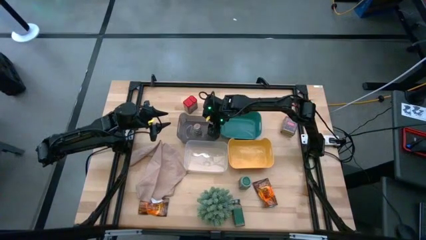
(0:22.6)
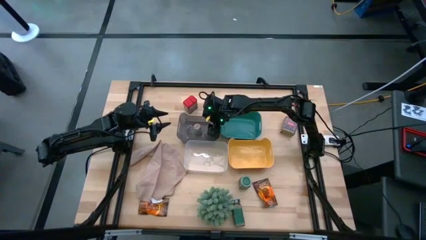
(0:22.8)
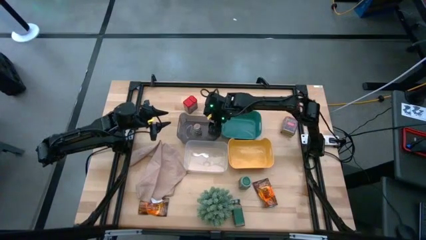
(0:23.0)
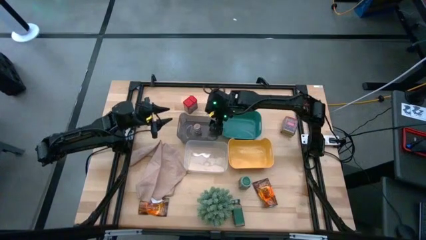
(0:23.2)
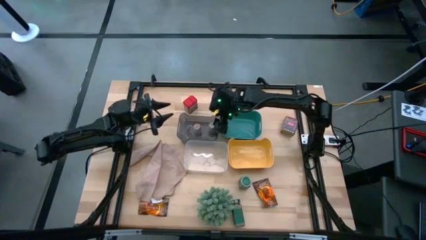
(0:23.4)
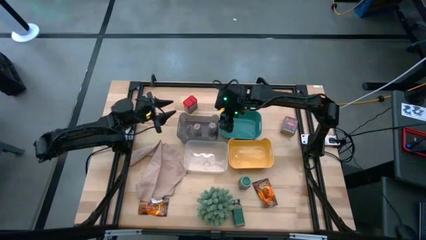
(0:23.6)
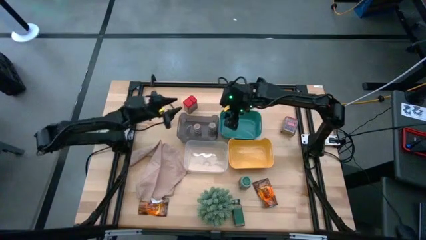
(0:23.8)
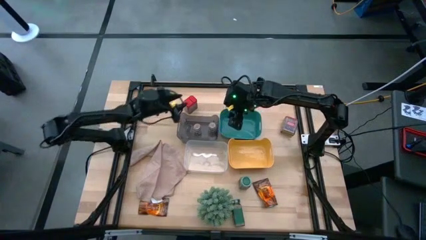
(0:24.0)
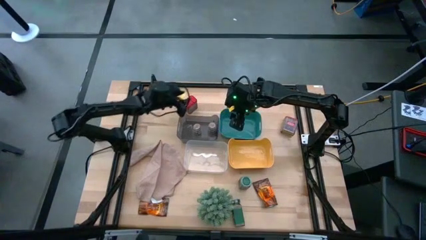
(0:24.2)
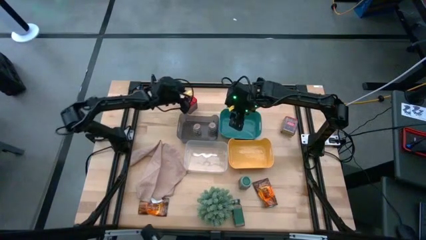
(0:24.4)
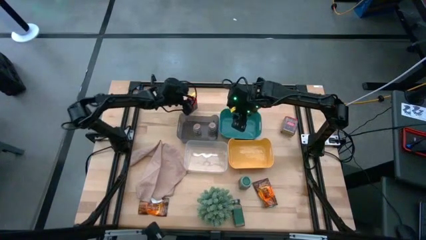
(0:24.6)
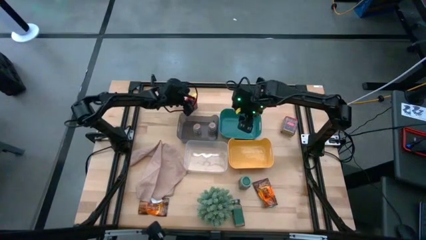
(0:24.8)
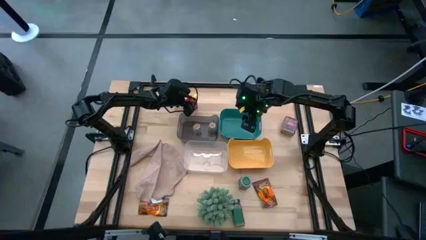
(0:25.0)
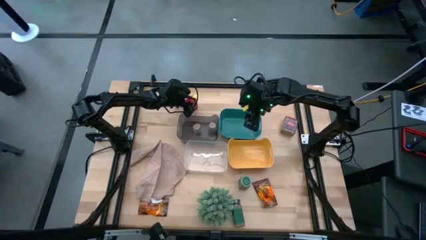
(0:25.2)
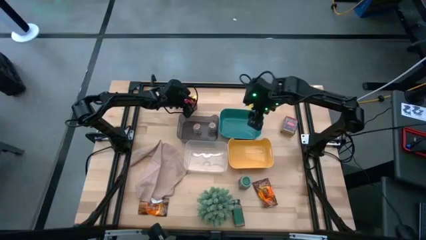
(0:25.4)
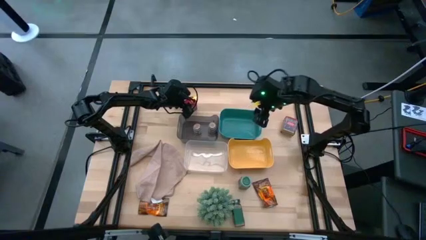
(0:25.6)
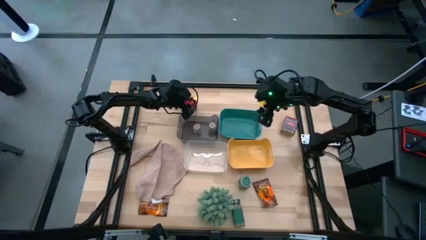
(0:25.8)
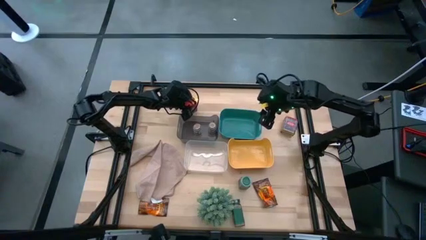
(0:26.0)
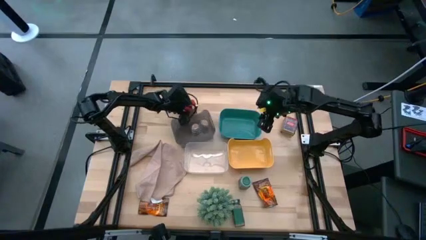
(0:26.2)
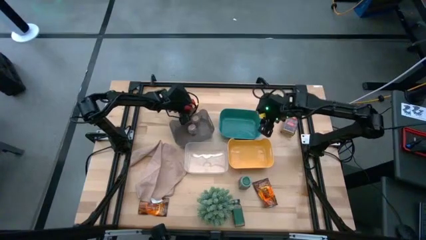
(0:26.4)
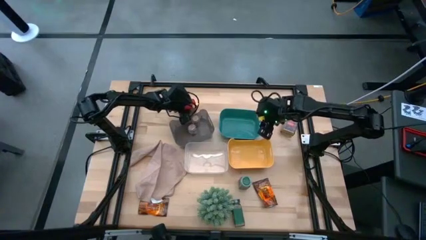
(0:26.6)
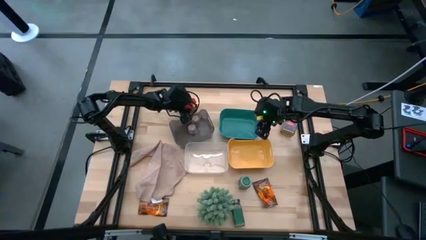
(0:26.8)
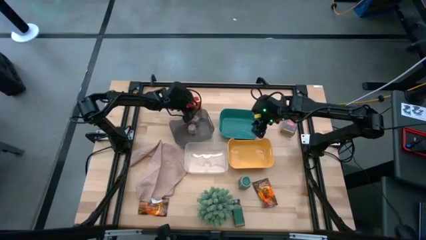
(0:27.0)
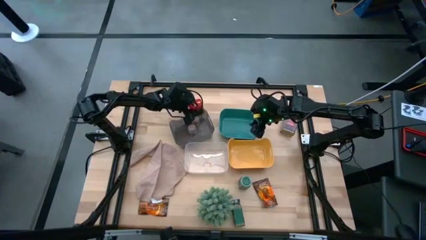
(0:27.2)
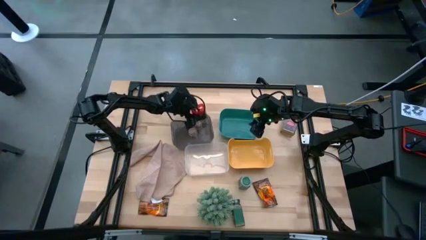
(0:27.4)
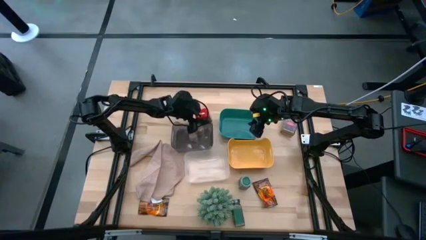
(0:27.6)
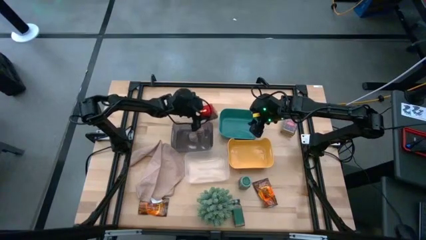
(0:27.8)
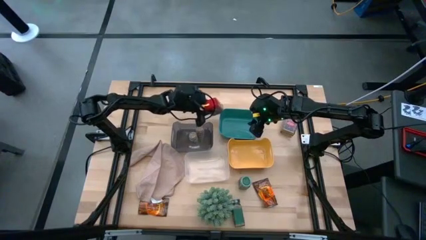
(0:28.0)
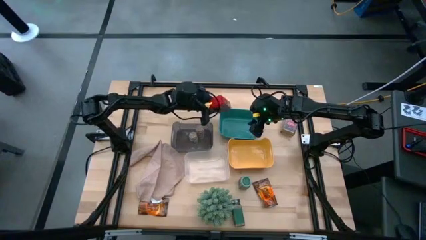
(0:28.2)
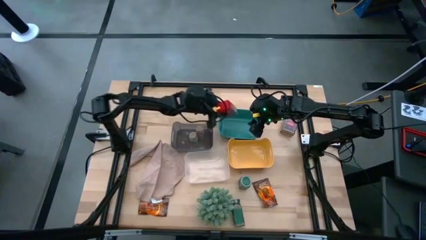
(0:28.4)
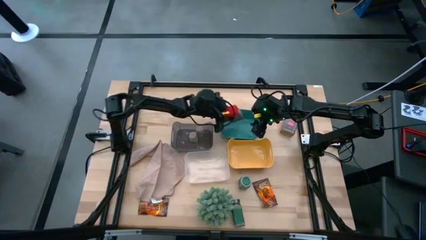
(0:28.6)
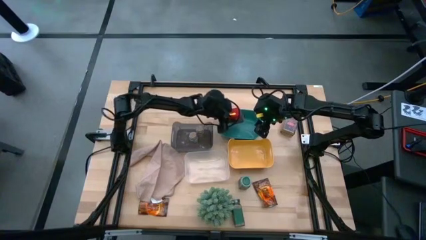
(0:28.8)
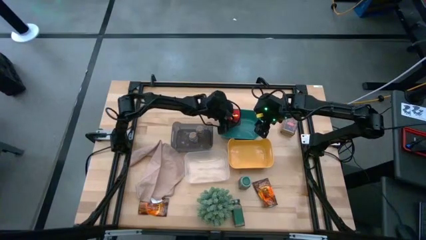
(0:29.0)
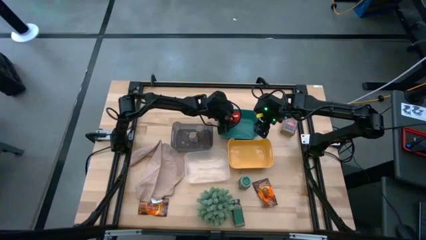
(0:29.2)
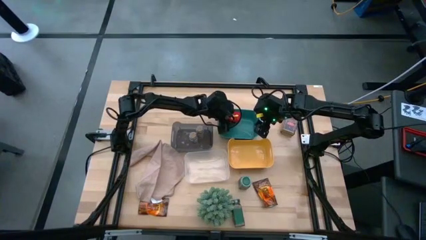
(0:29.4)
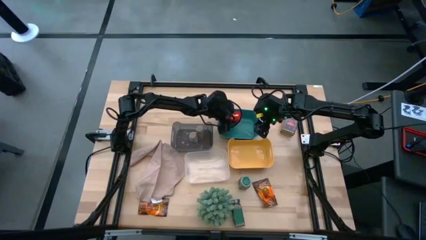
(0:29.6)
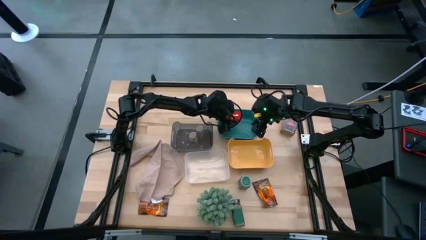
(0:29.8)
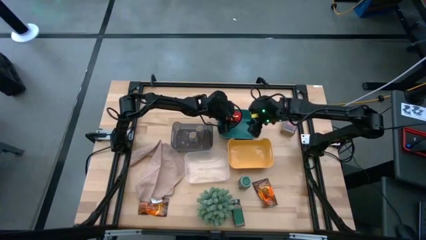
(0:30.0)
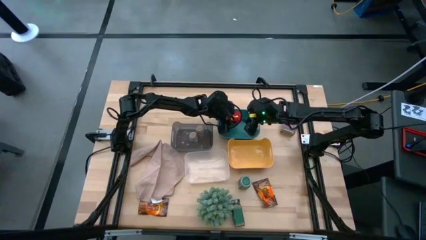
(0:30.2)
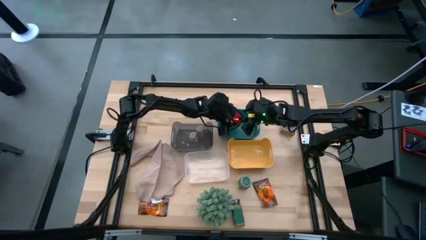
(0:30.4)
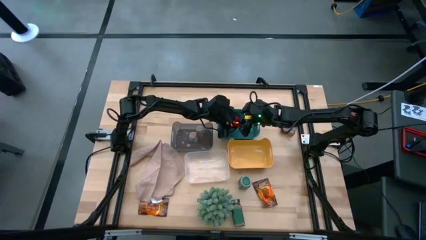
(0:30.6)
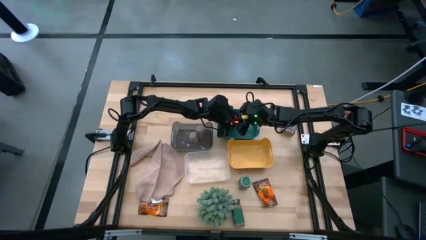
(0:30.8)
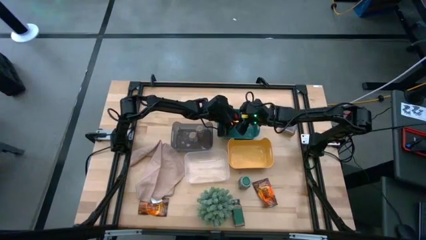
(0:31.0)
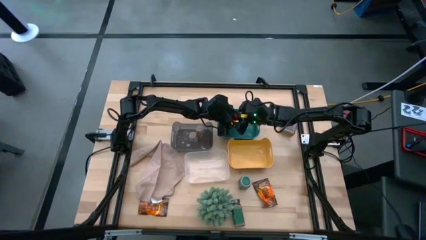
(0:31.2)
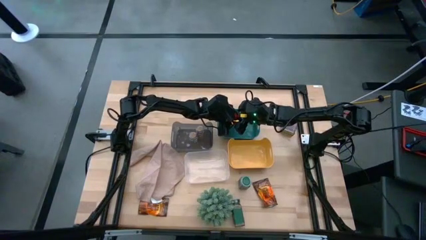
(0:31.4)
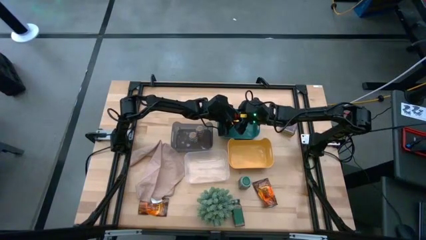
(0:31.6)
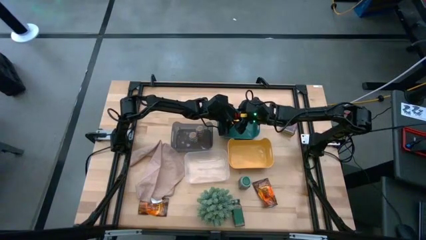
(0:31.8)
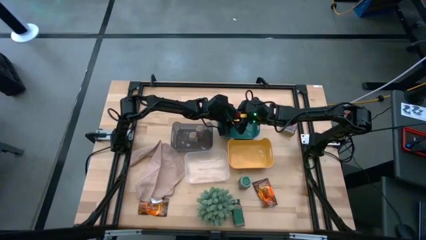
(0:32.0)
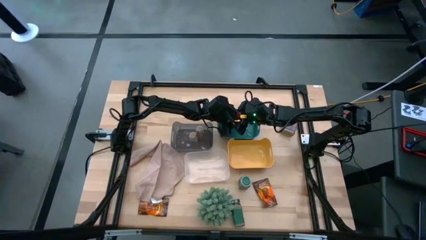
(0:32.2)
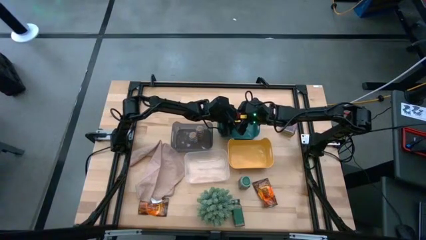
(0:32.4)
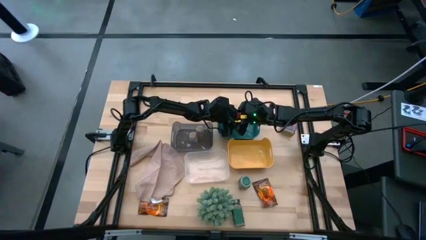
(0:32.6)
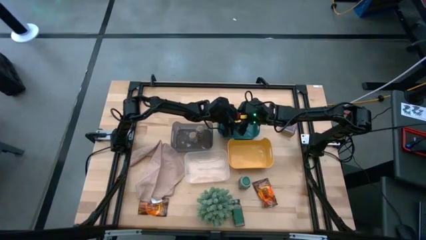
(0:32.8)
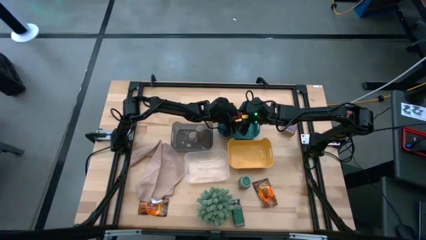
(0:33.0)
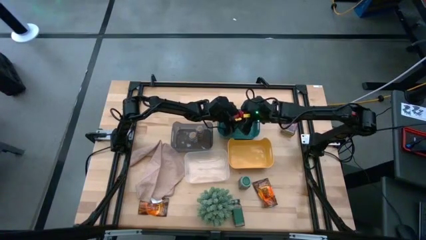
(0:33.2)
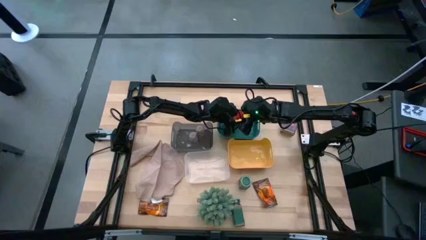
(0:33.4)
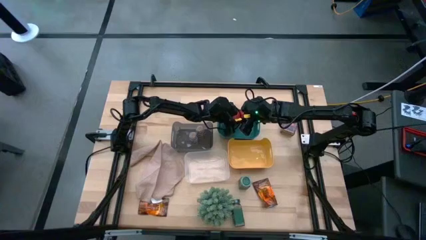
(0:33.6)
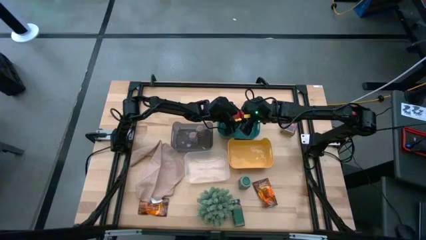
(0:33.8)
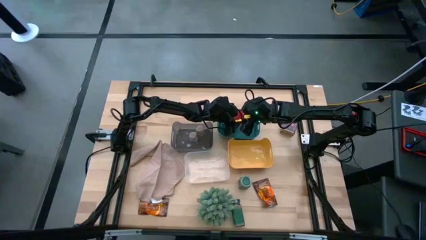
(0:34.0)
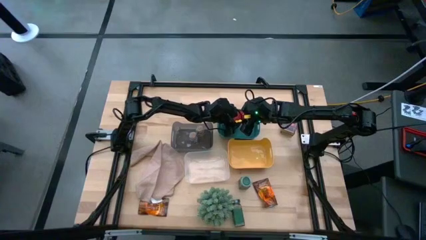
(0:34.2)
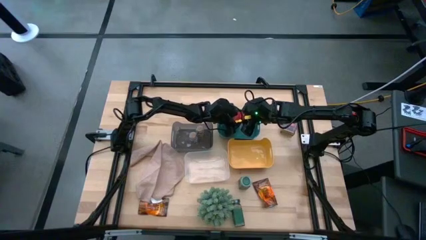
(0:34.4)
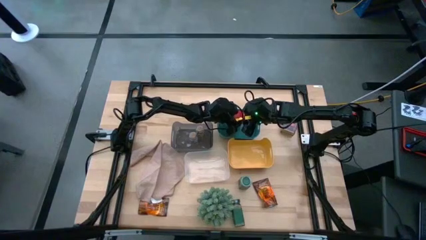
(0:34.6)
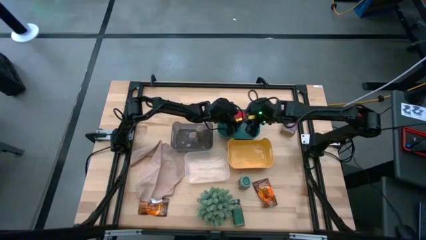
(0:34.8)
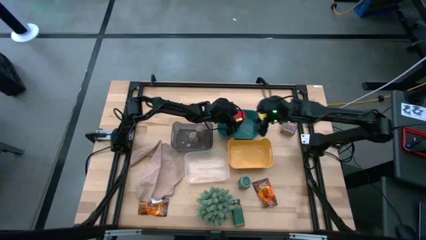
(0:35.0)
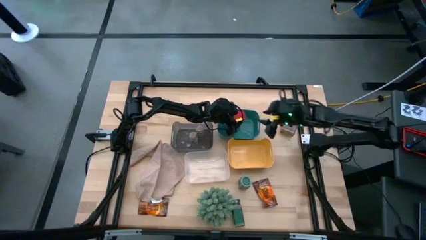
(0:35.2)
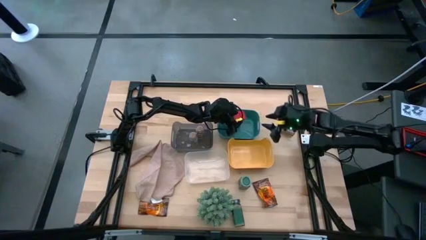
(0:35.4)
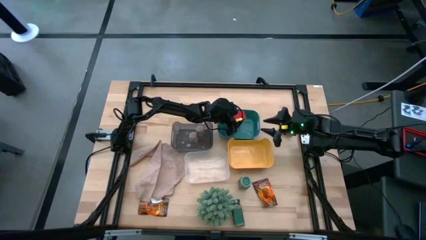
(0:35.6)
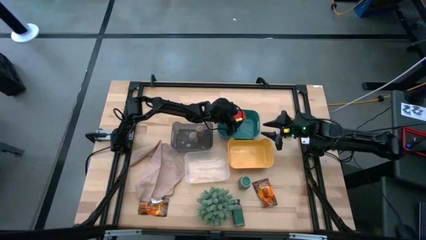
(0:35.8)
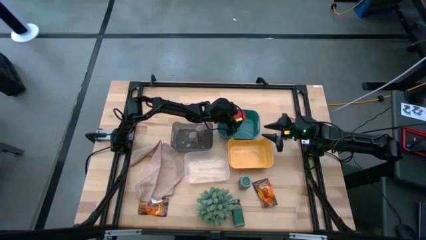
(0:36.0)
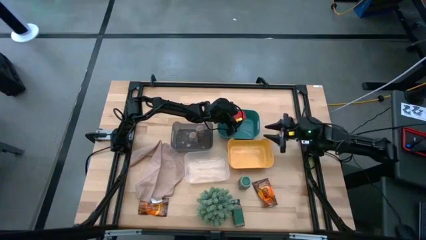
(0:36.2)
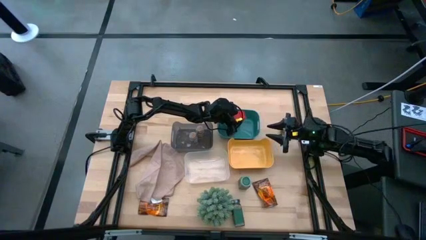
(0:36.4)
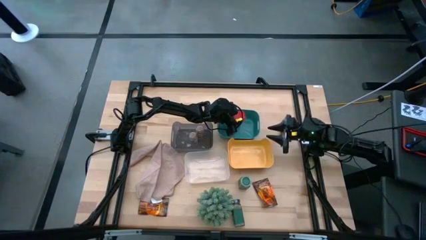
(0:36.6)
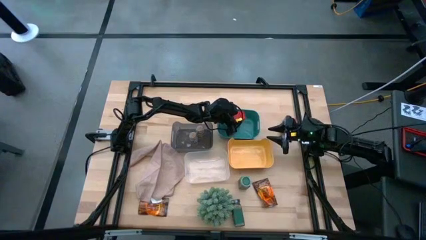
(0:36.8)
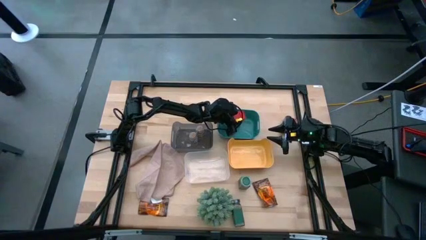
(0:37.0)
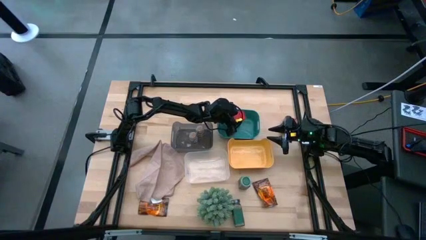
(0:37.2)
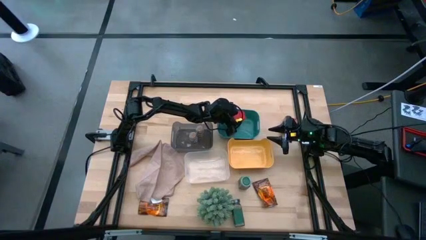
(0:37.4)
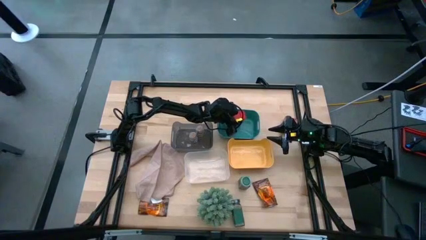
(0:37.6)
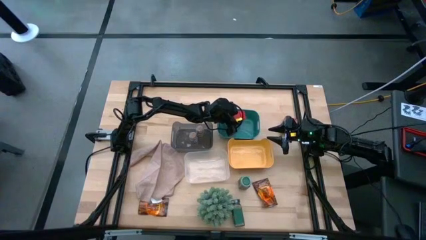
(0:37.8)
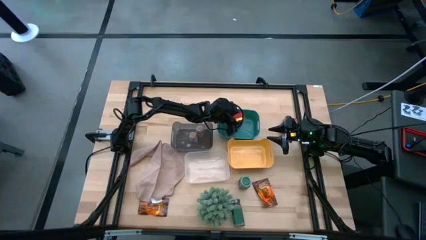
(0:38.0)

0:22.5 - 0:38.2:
Task: Sort spices by type
Put the left red seasoning can into the blue bin
